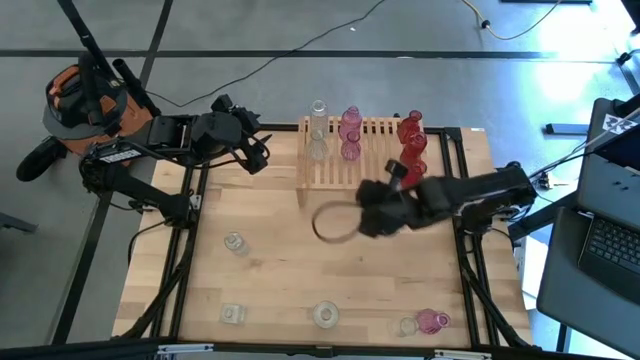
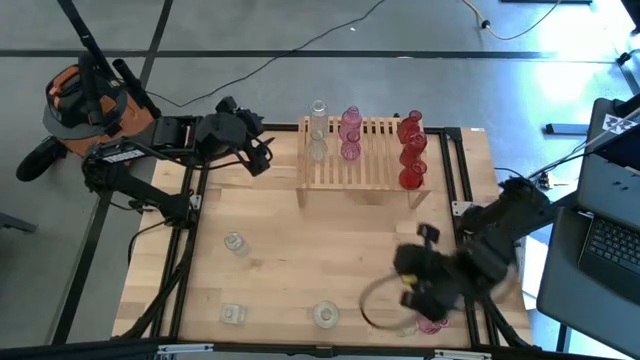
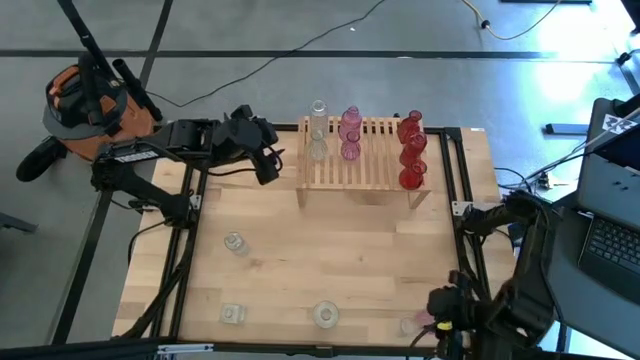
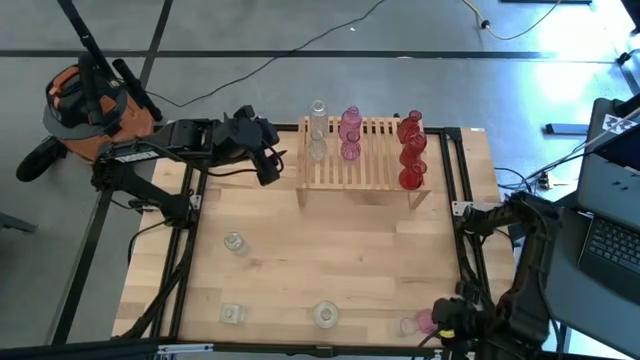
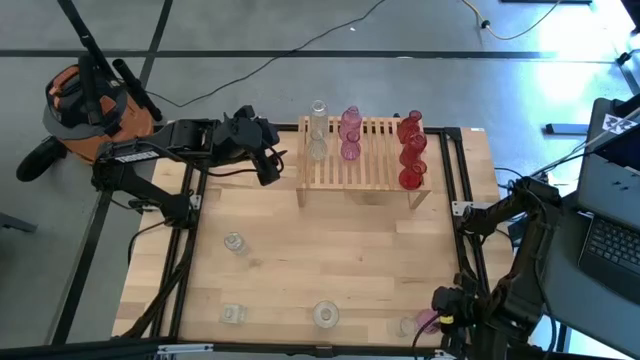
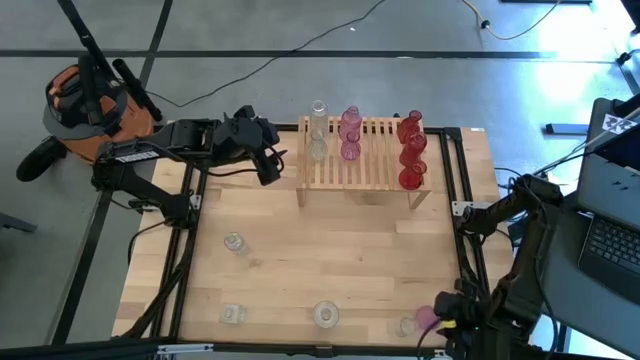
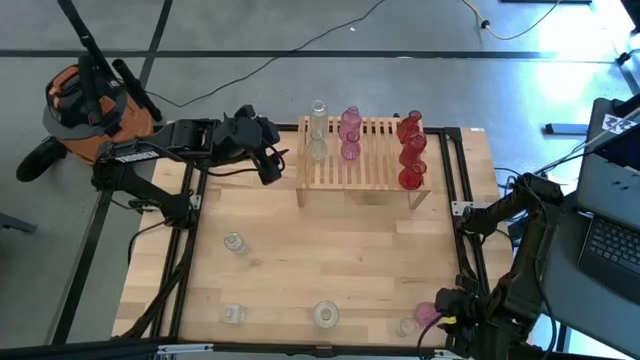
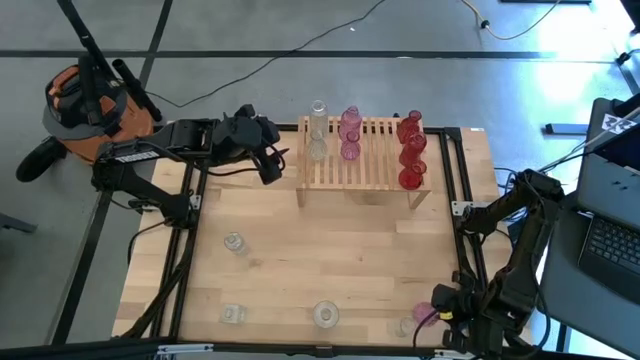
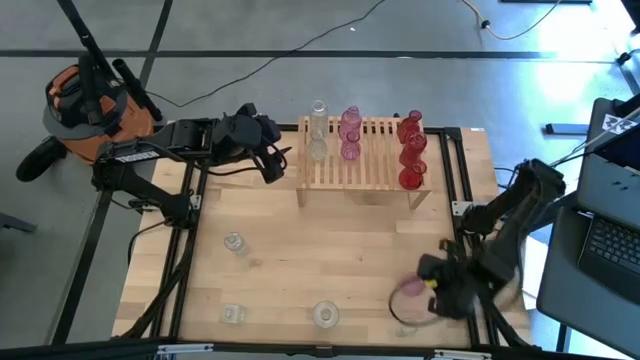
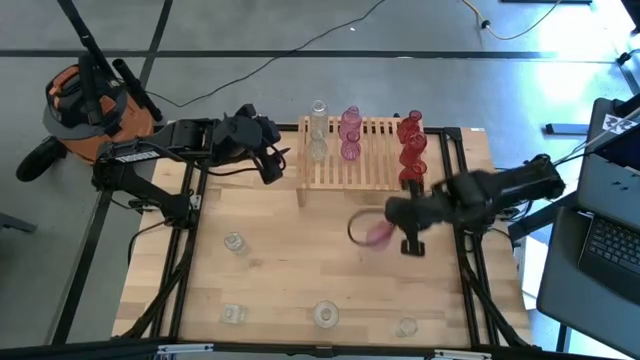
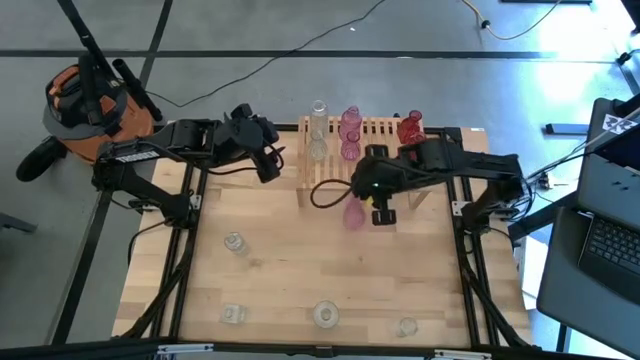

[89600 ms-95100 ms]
Task: sort vases onto shelf
Put the pink vase on the shelf aligned with the other pink vase

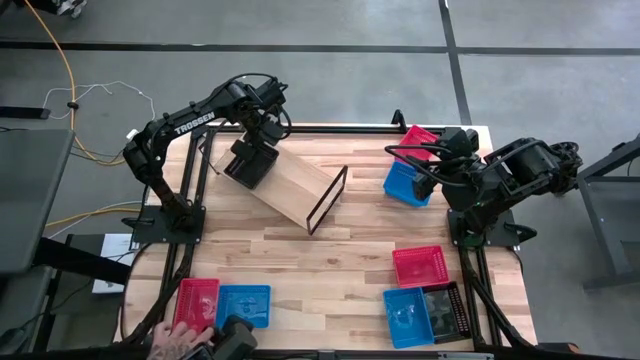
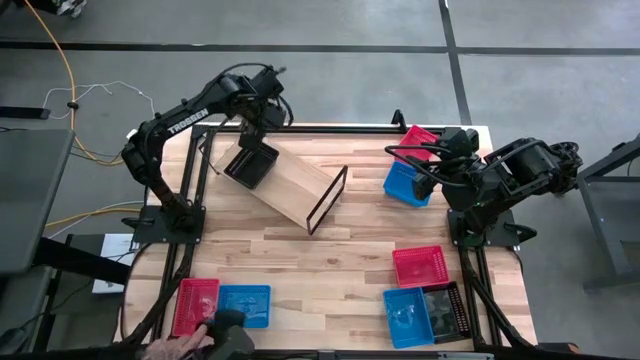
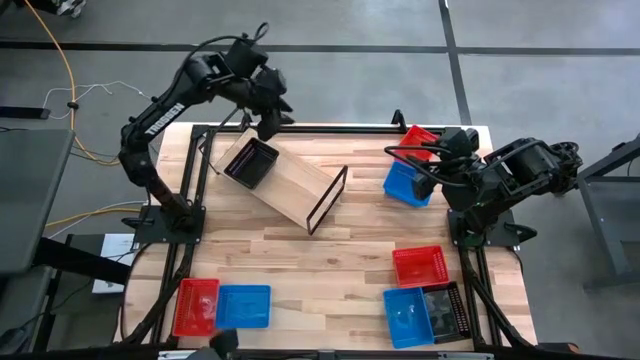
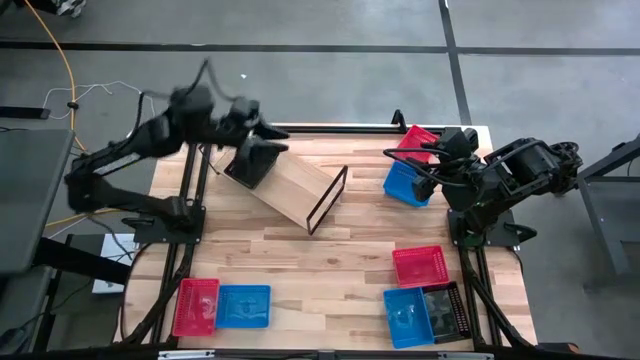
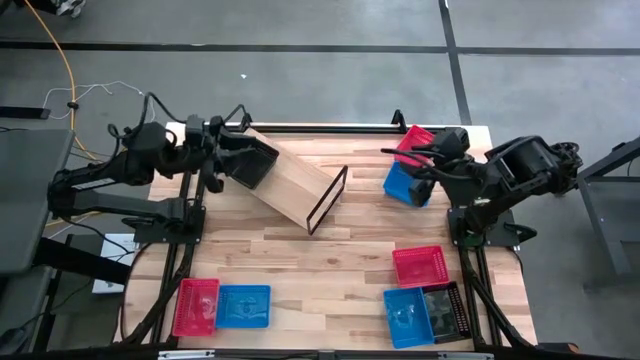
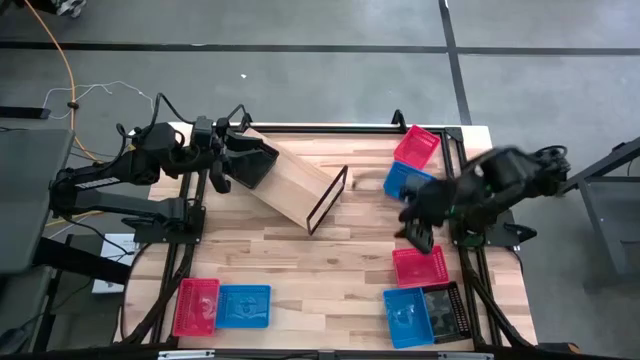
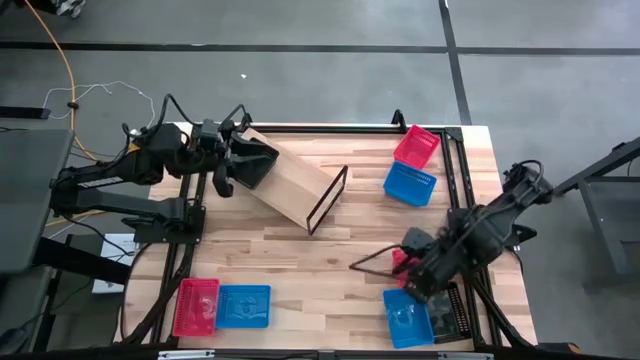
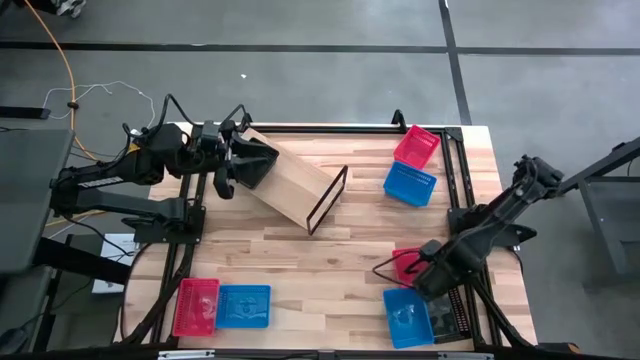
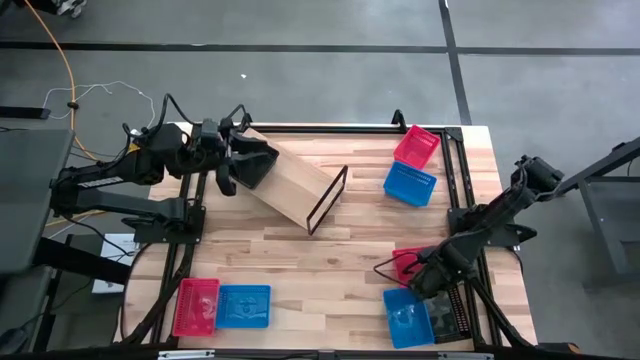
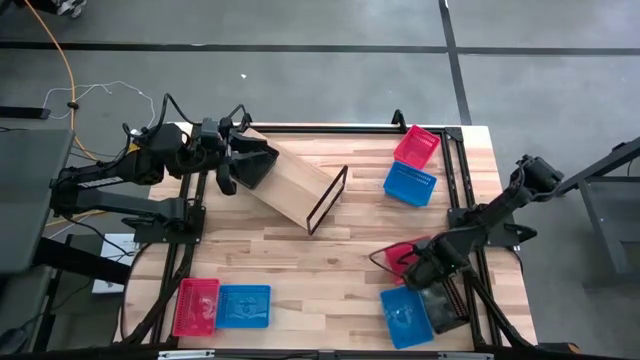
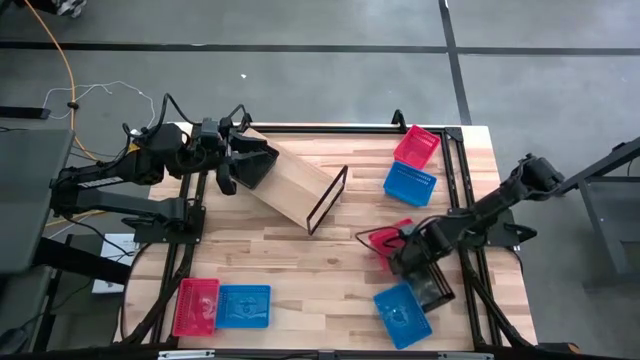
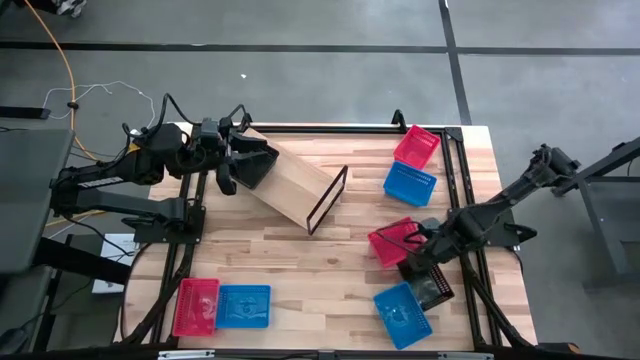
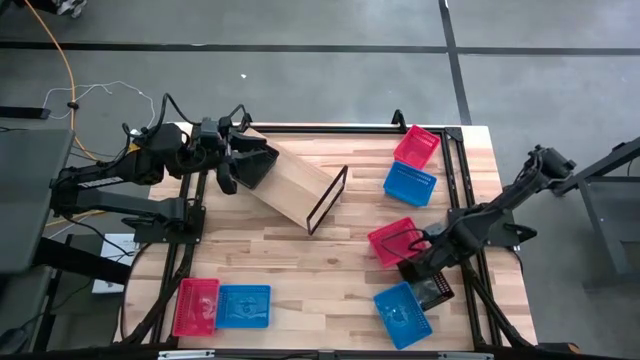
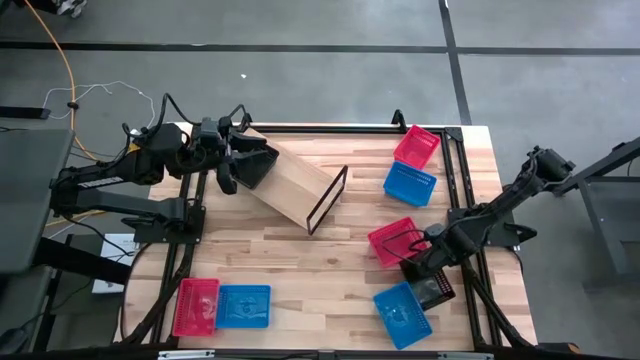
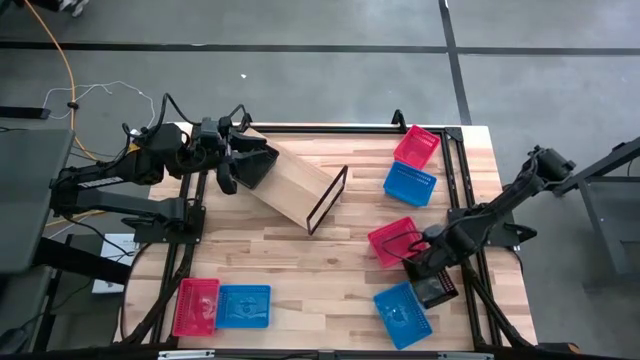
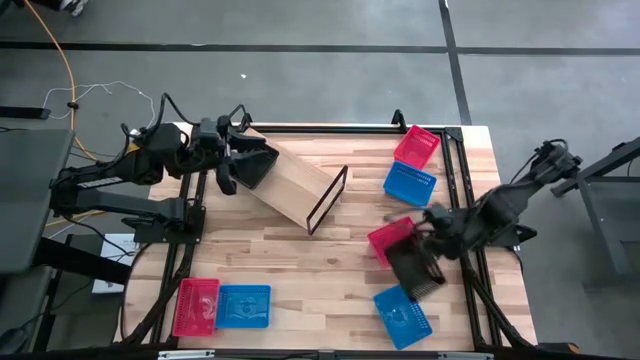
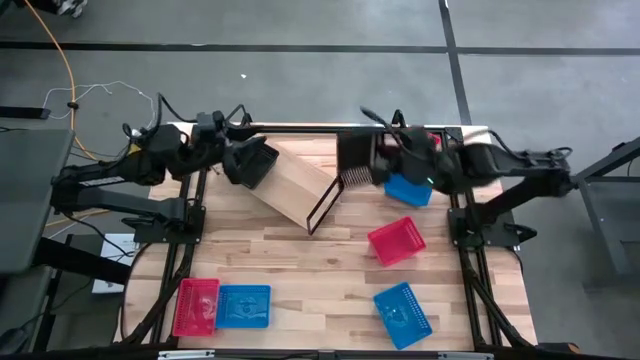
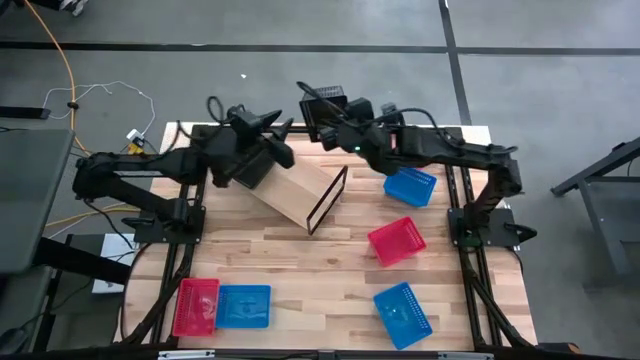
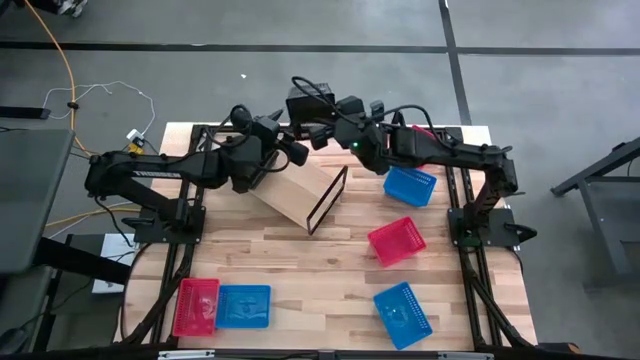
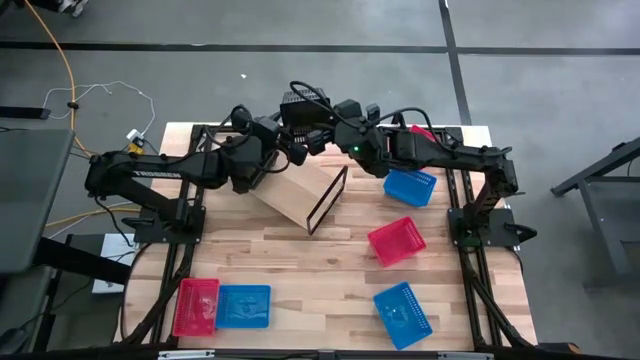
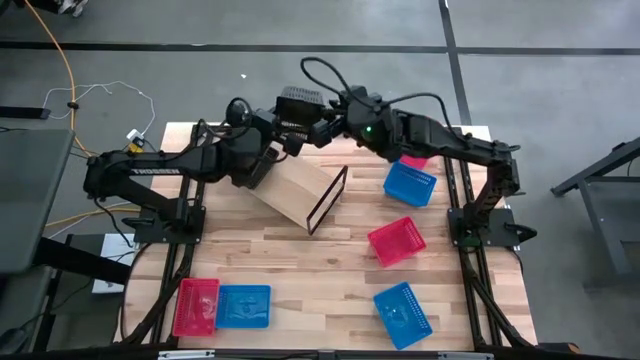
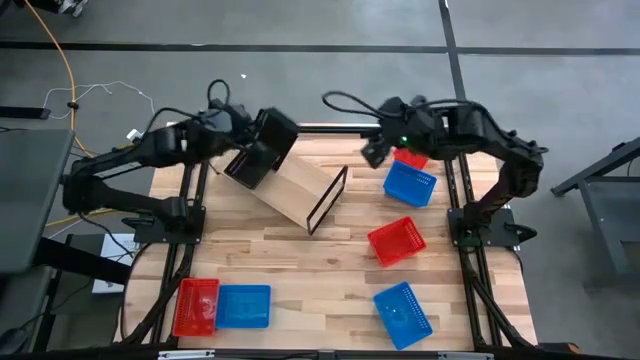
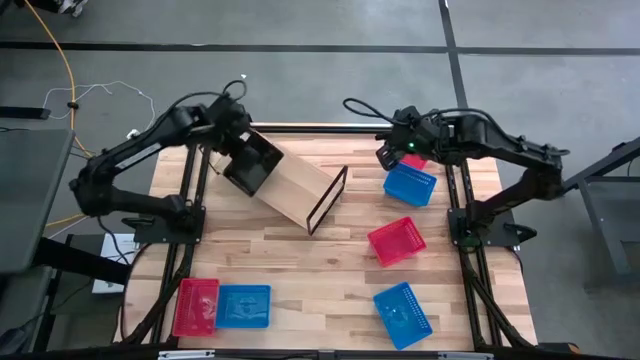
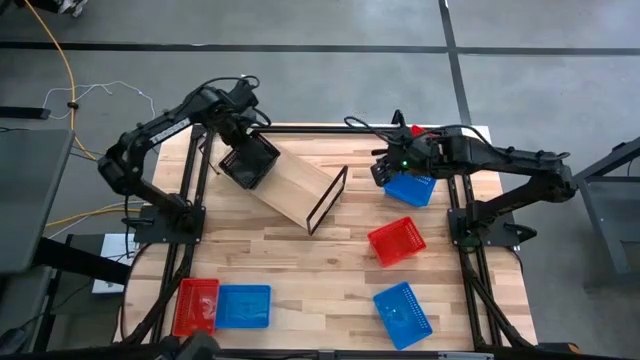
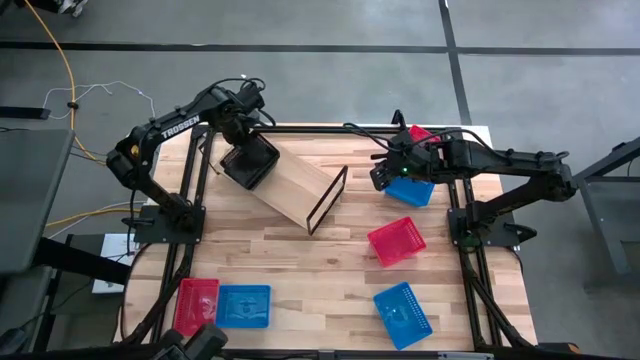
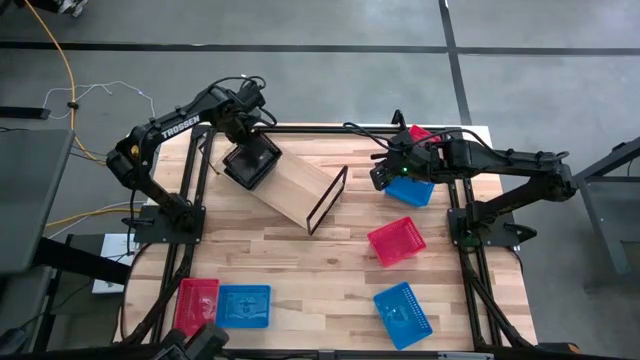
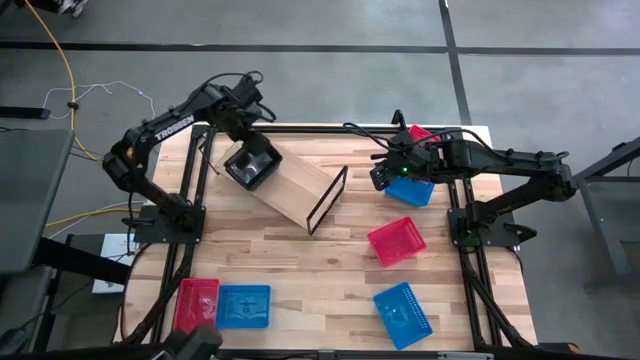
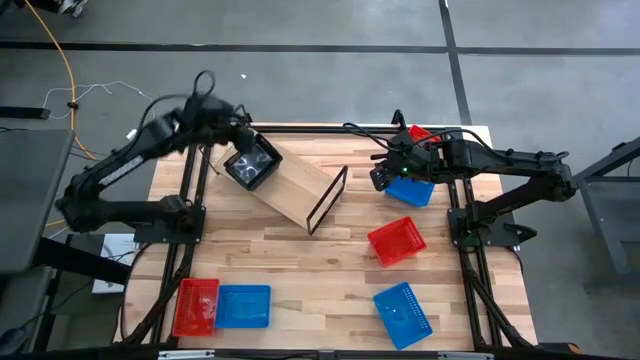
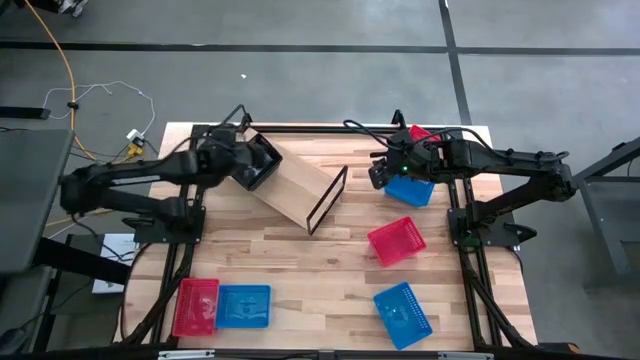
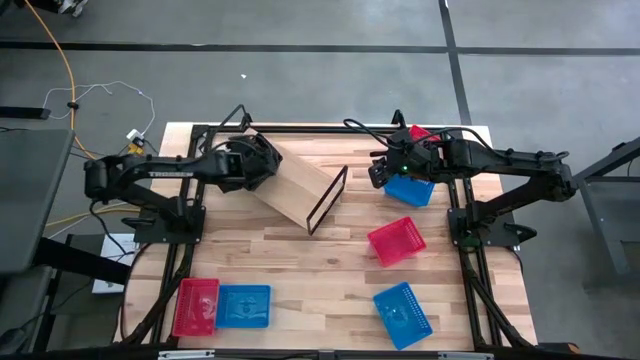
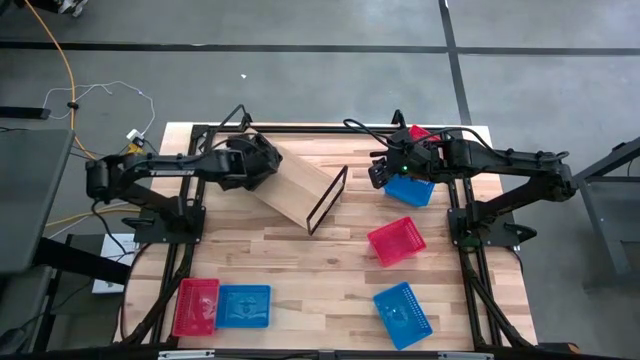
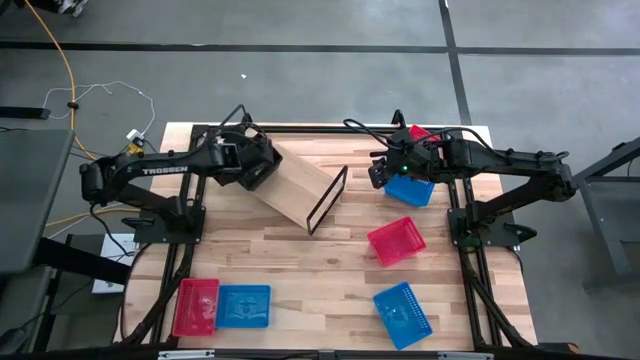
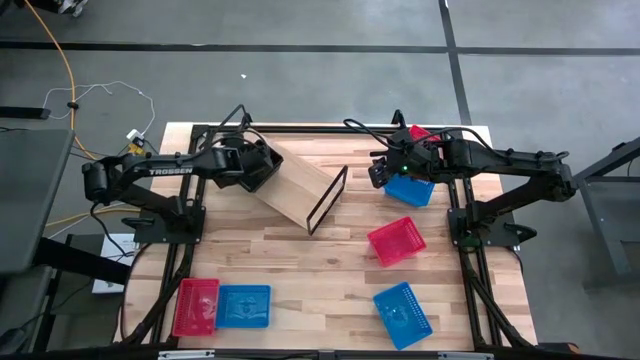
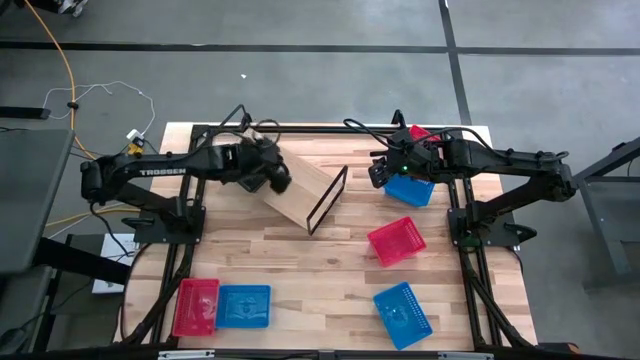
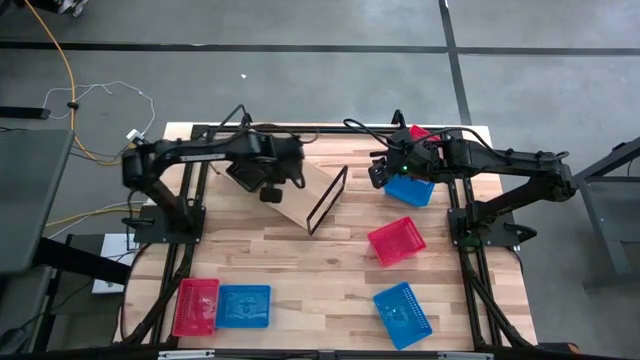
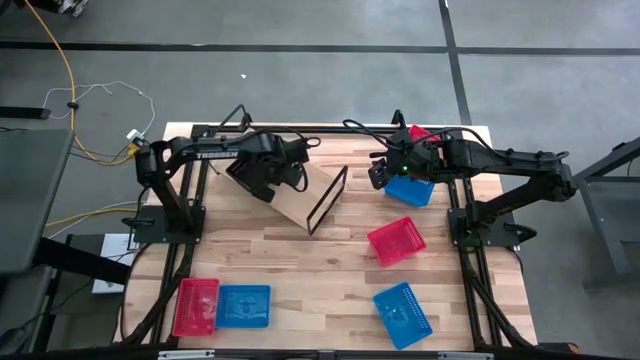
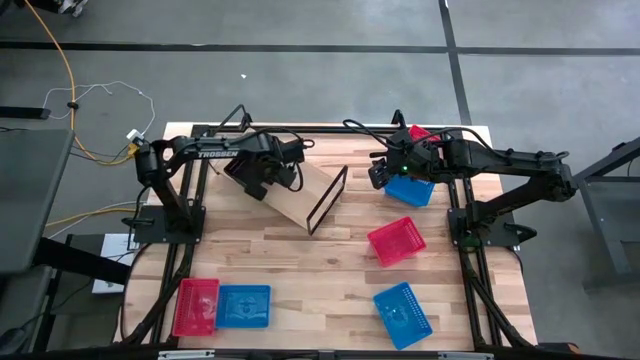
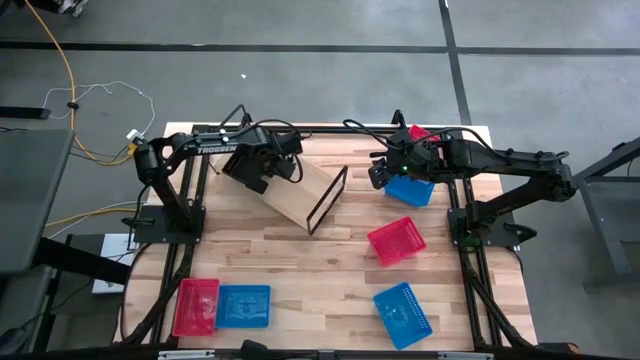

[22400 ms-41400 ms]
Task: Stack baskets on shelf by color
Stack the black bin into the black bin on the shelf
